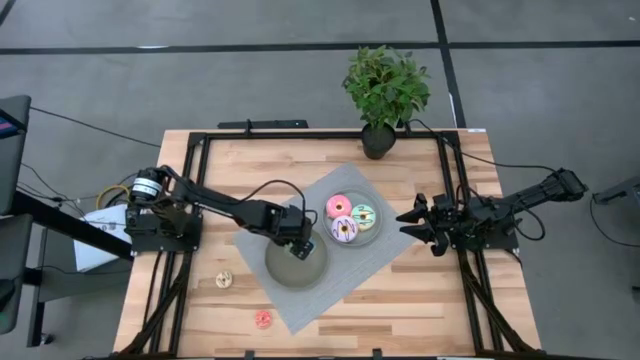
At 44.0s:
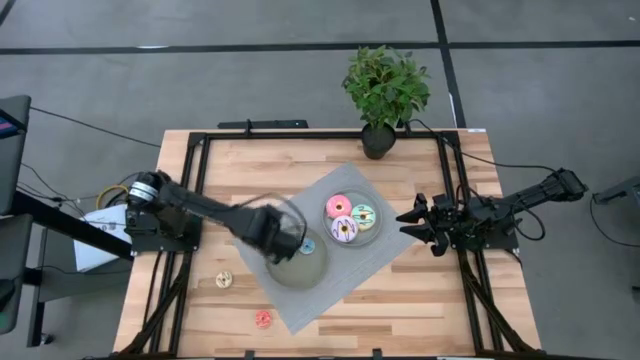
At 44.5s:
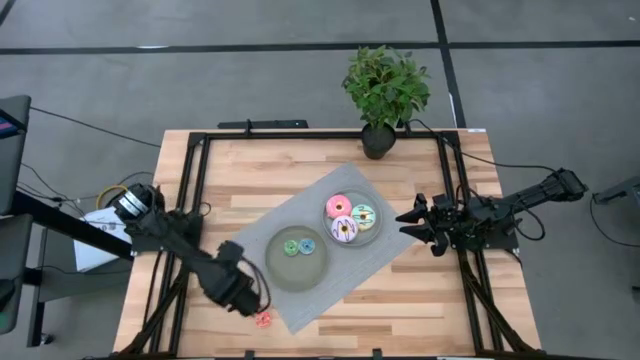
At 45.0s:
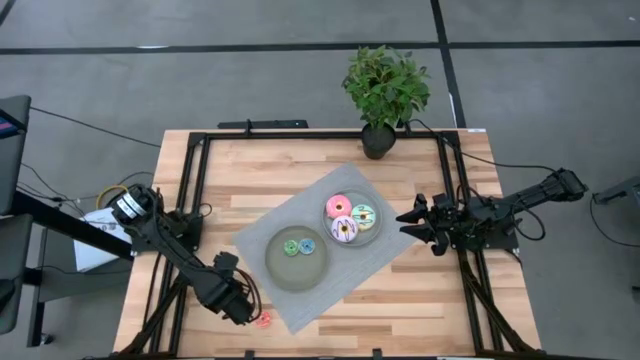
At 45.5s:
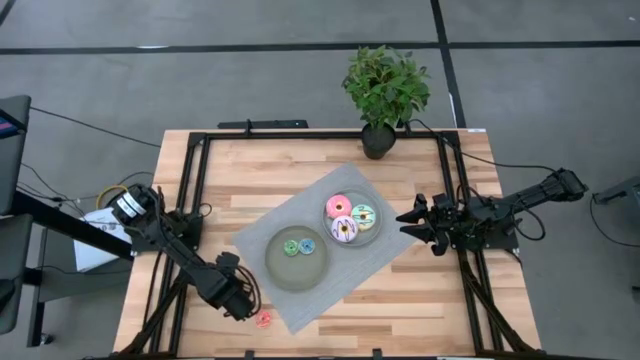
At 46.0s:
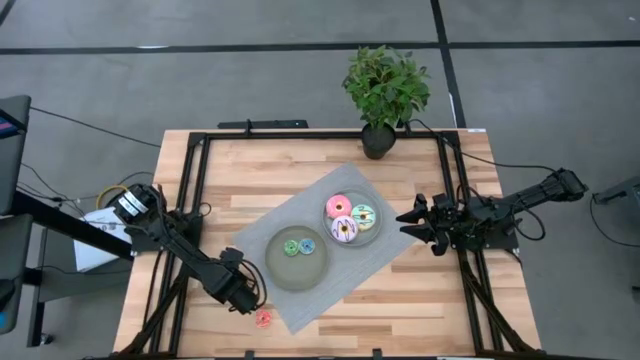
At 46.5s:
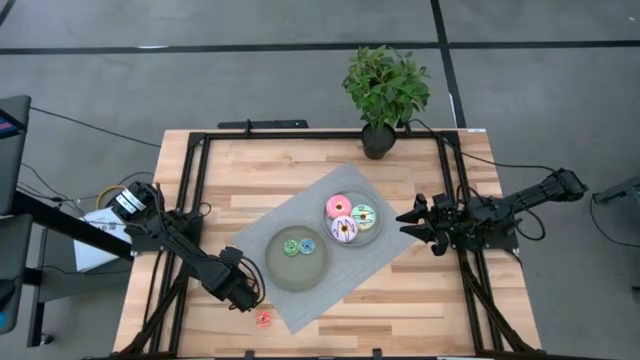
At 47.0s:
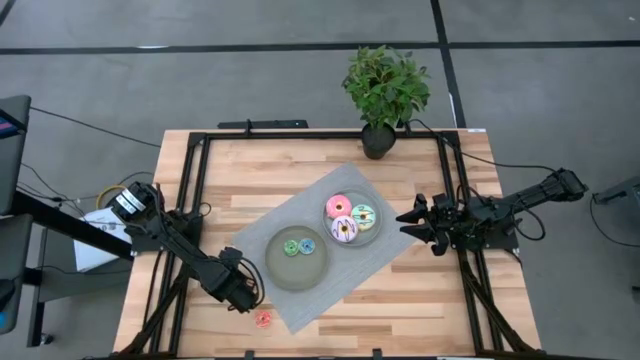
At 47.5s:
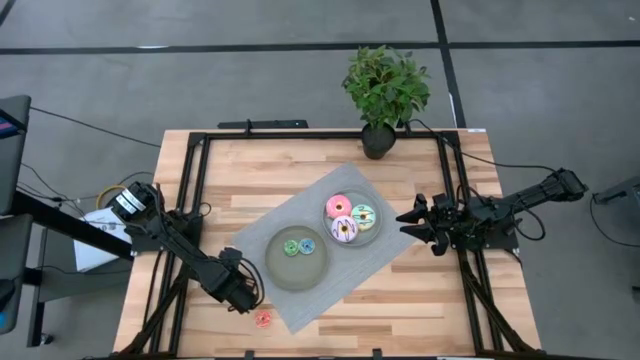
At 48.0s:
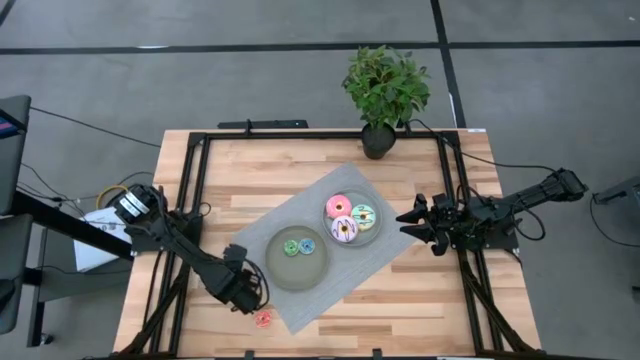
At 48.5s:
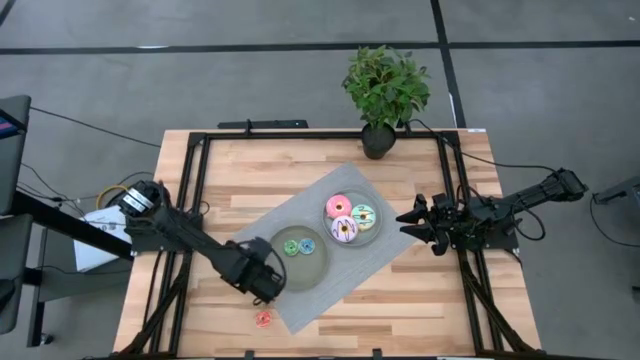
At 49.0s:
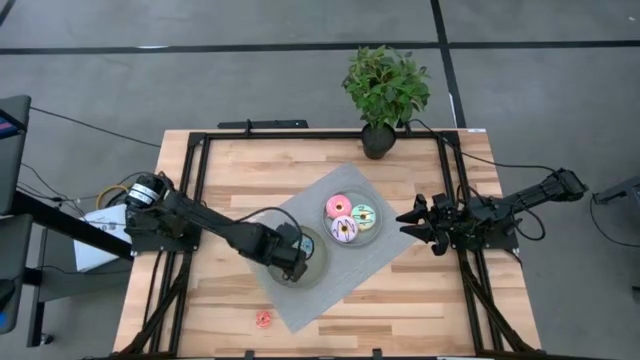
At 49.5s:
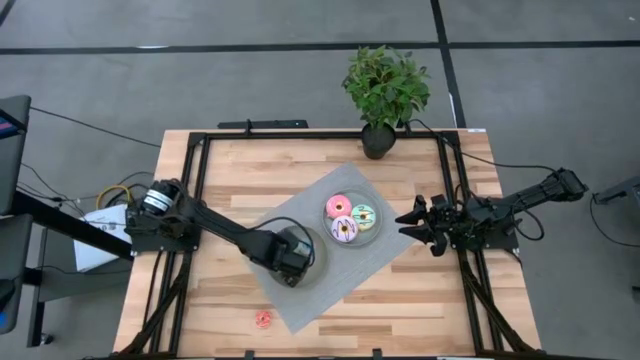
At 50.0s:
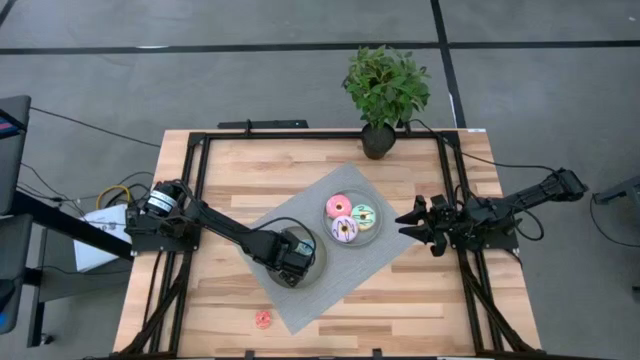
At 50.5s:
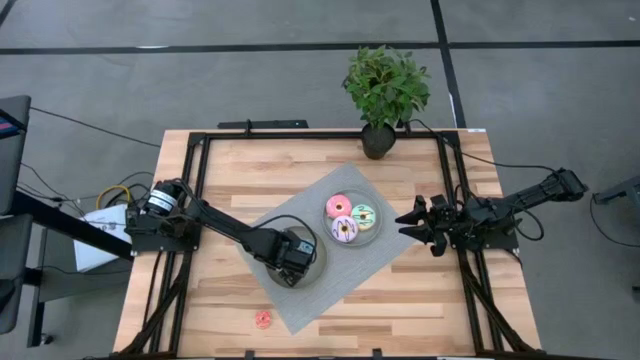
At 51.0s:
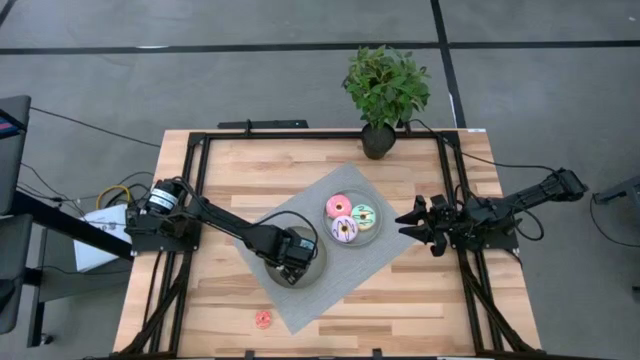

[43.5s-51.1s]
Task: Pick & Place donuts
Put the small white donut on the dark gray plate

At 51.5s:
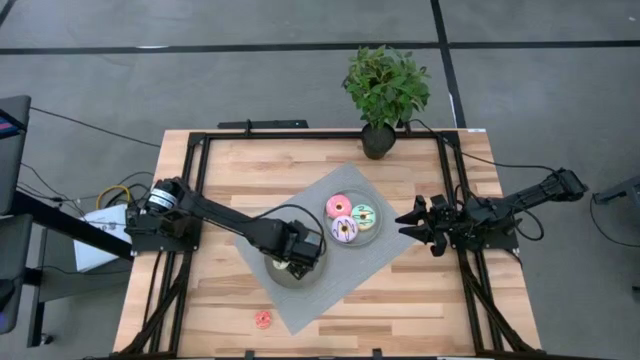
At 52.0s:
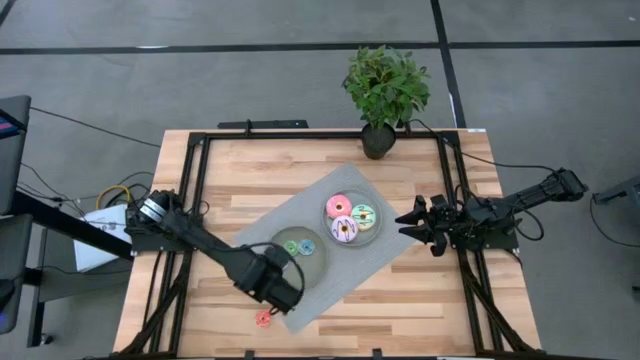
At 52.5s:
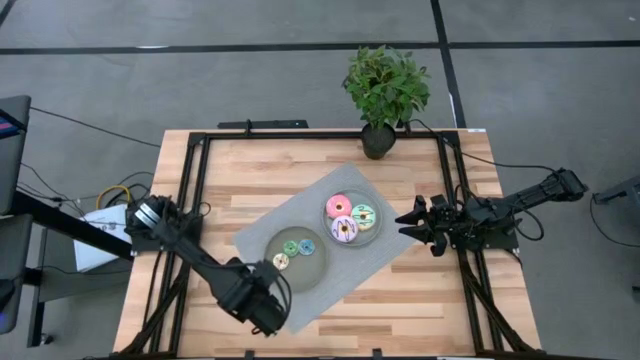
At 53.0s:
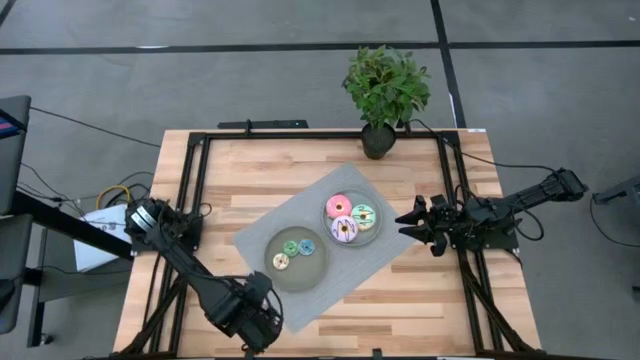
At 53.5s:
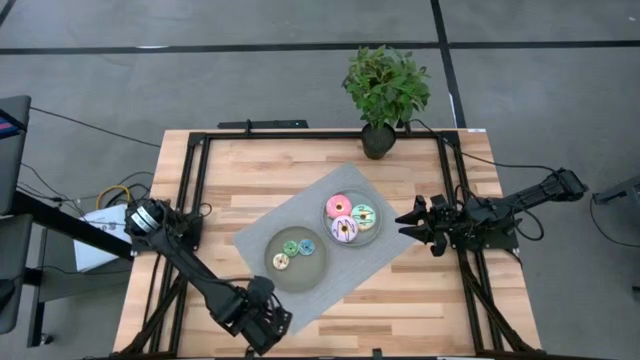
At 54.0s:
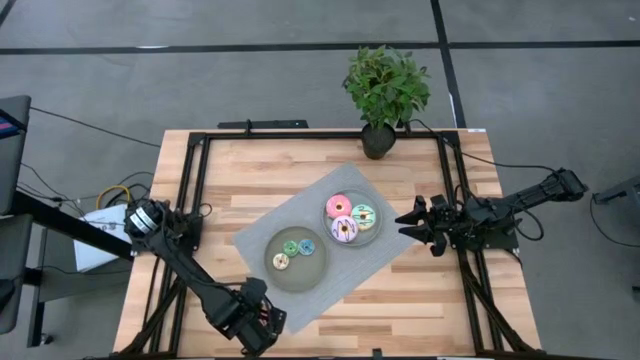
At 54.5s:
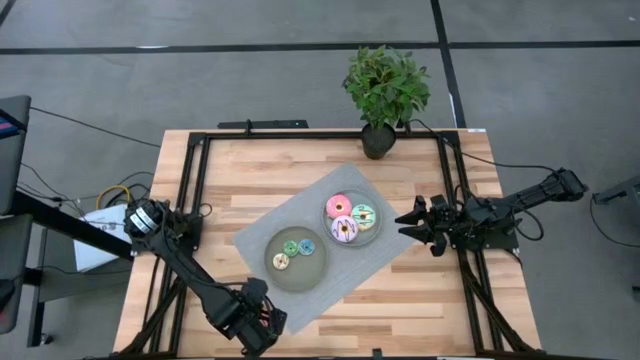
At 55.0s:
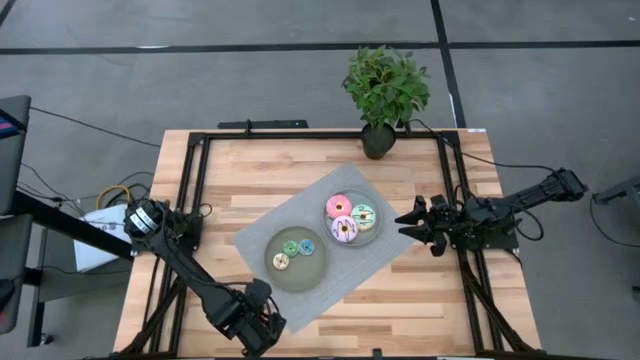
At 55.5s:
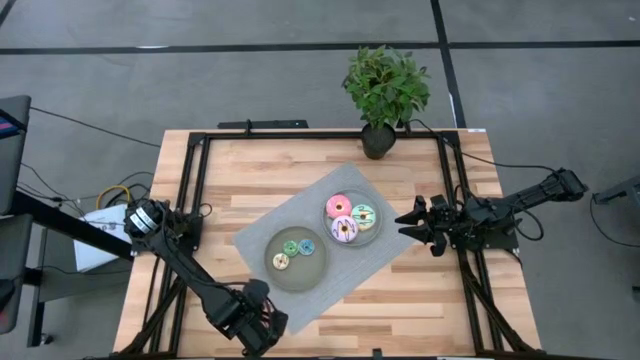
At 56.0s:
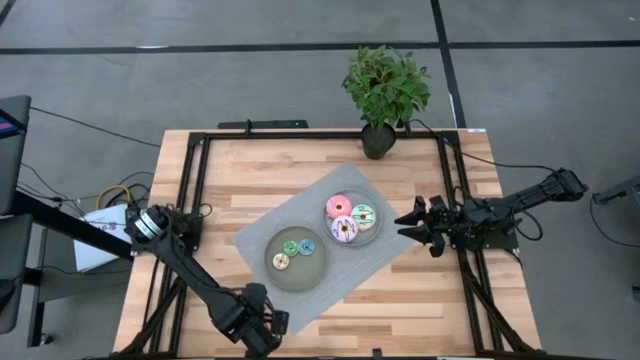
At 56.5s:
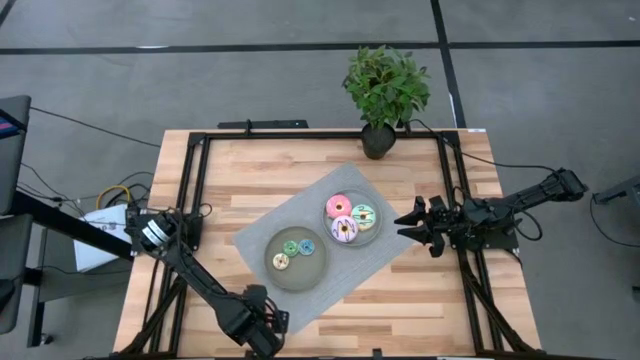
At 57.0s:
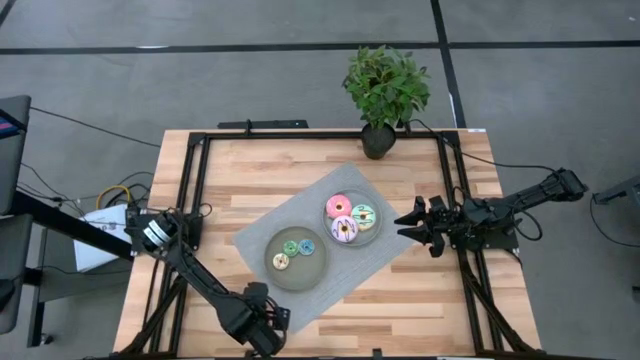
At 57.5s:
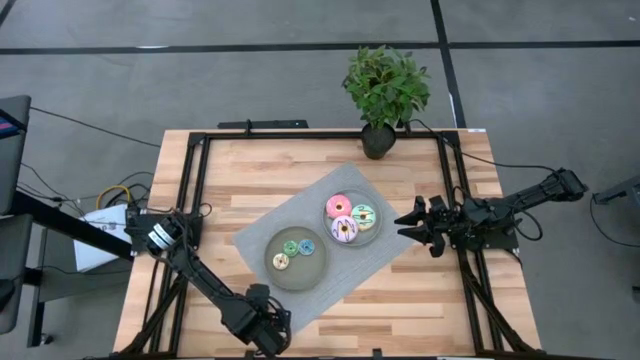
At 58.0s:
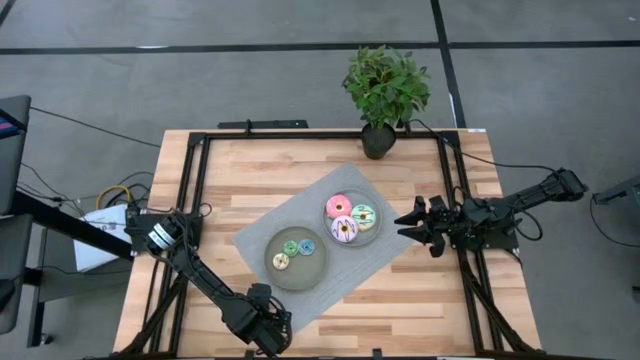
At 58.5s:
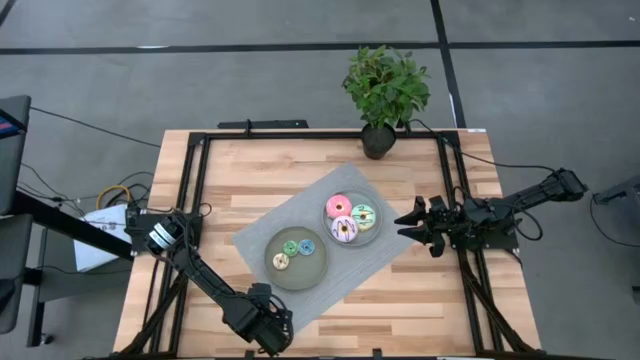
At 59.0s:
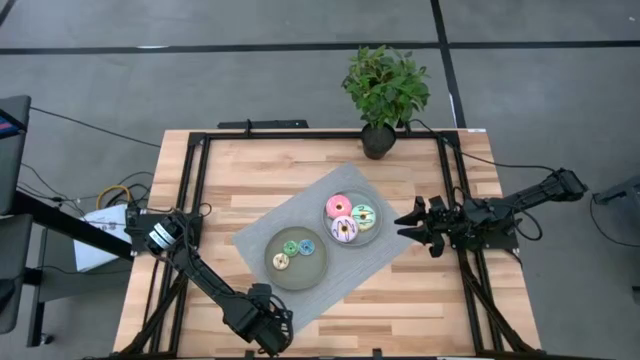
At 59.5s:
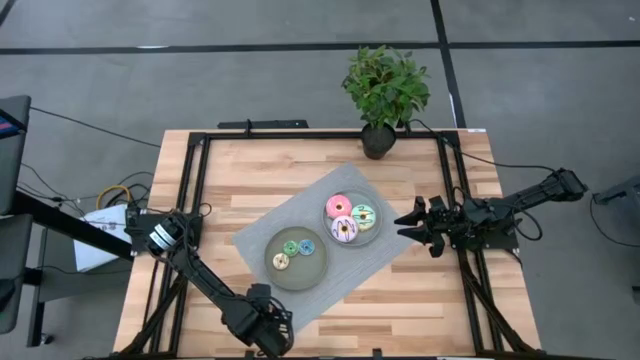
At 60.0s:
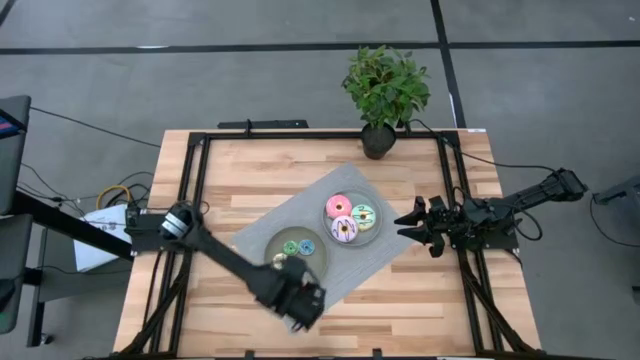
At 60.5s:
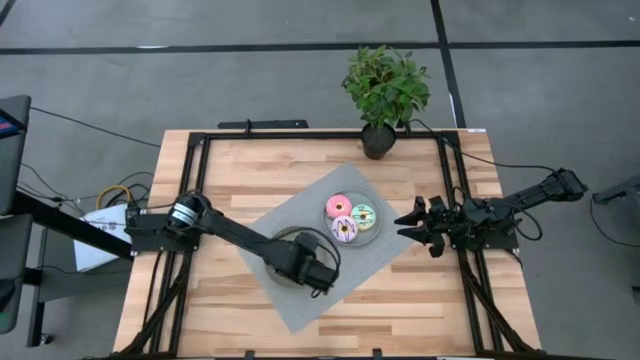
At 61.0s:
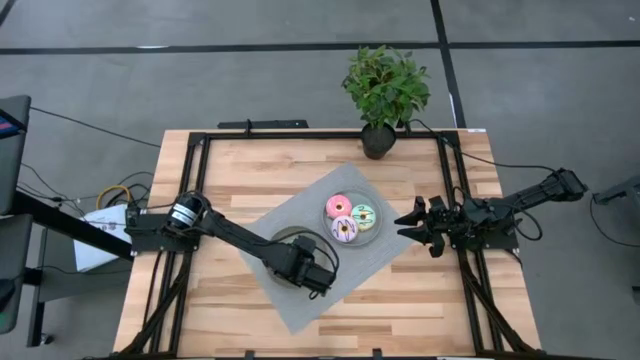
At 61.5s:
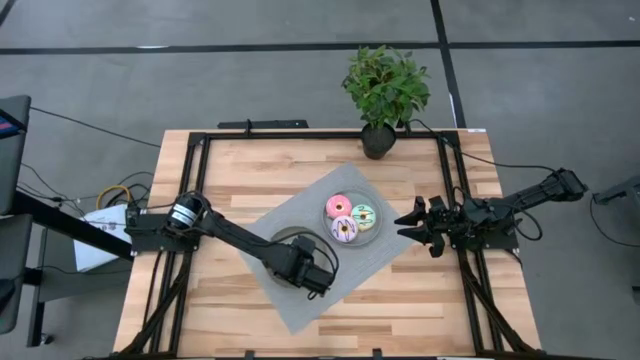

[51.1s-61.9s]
Put the small pink donut on the dark gray plate

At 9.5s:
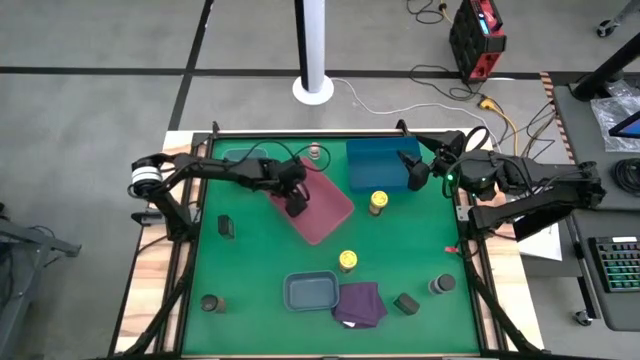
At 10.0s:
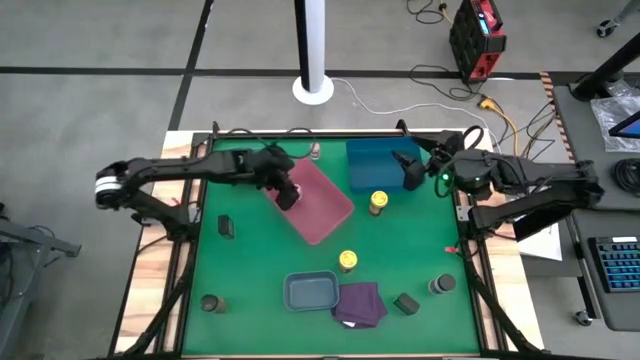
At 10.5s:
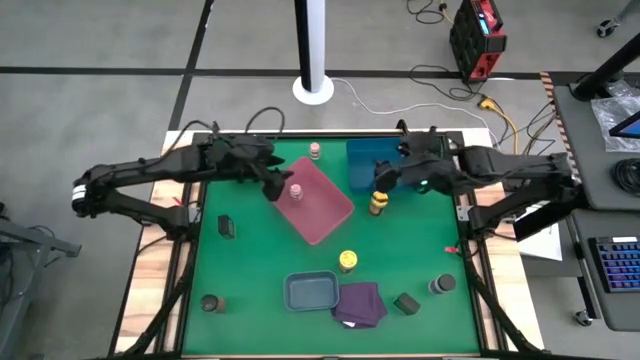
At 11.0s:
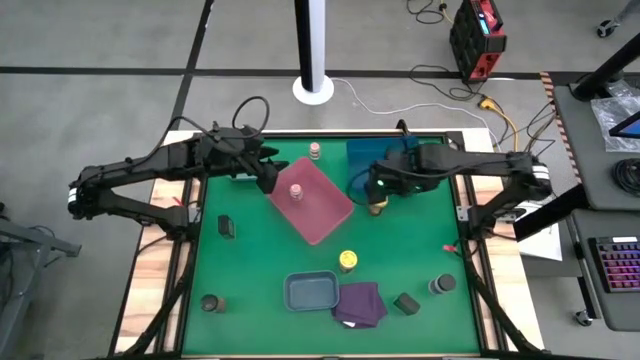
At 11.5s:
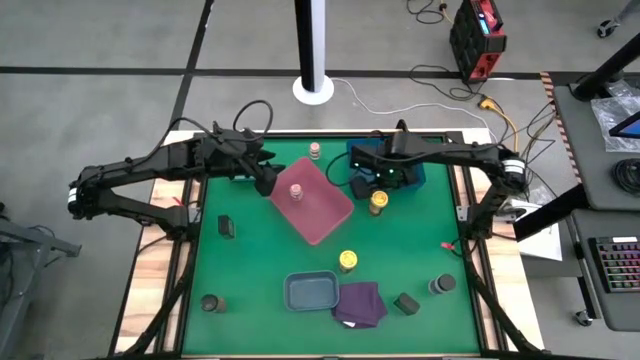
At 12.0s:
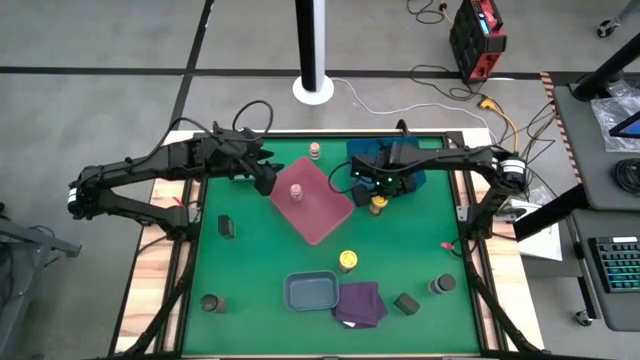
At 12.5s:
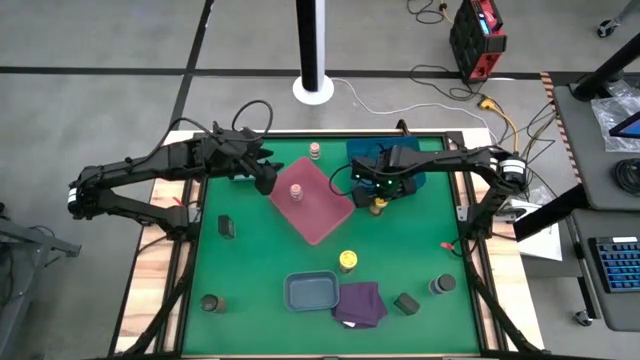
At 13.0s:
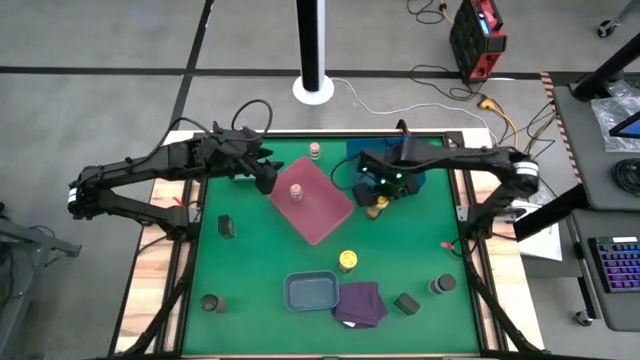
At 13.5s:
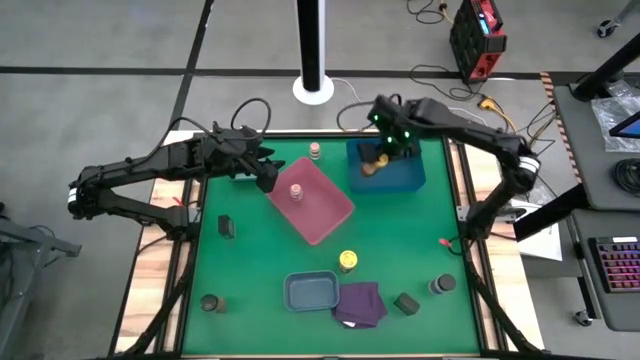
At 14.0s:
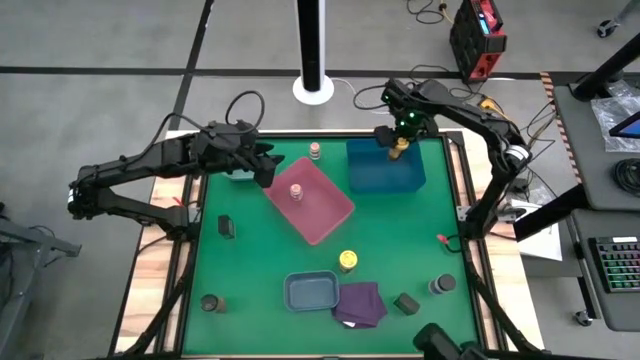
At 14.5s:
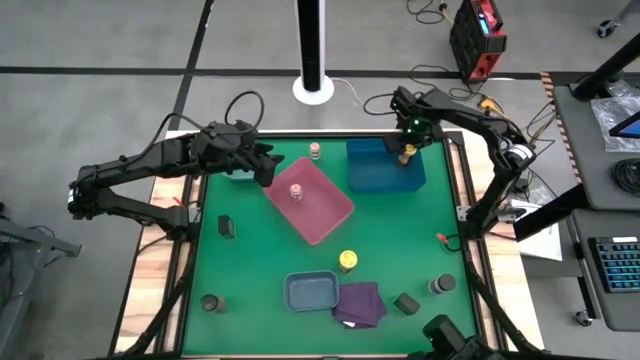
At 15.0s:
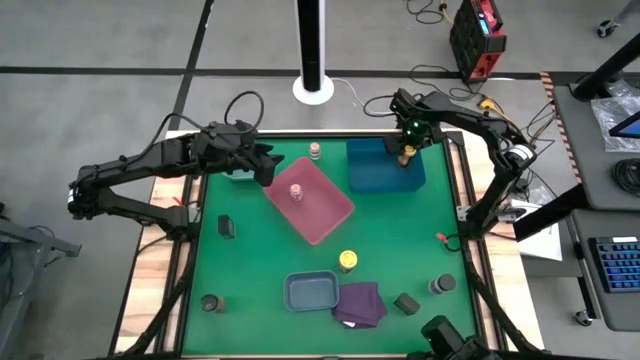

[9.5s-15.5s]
Task: Sort spices by type
Put the top yellow seasoning can into the blue bin
